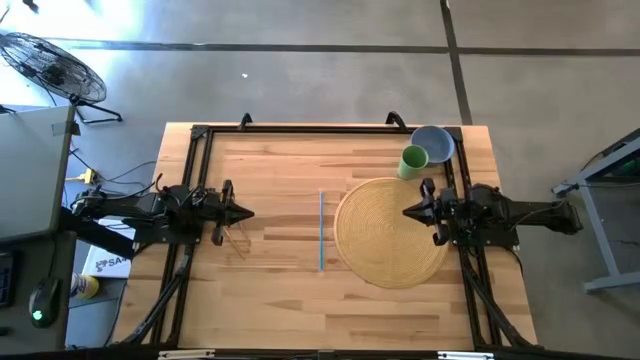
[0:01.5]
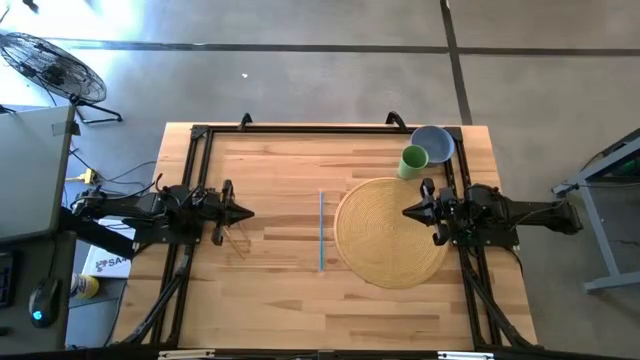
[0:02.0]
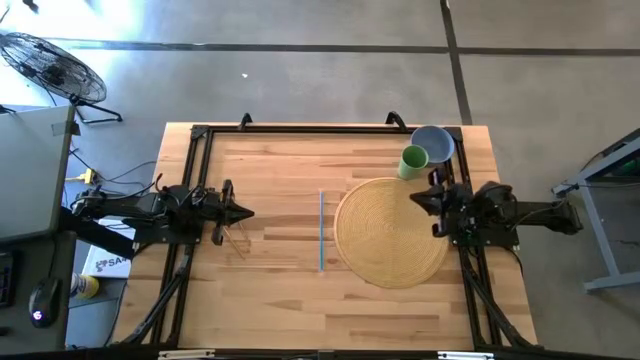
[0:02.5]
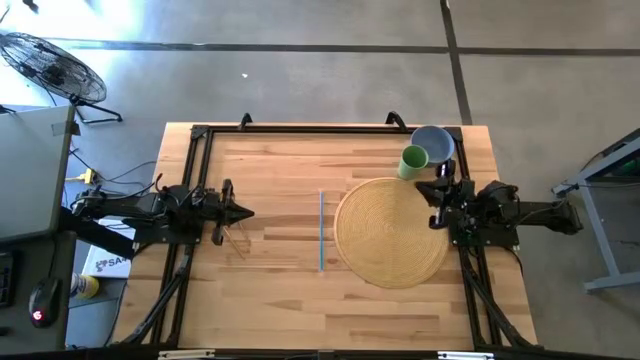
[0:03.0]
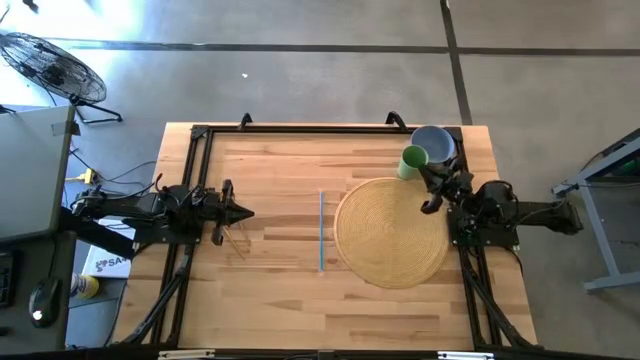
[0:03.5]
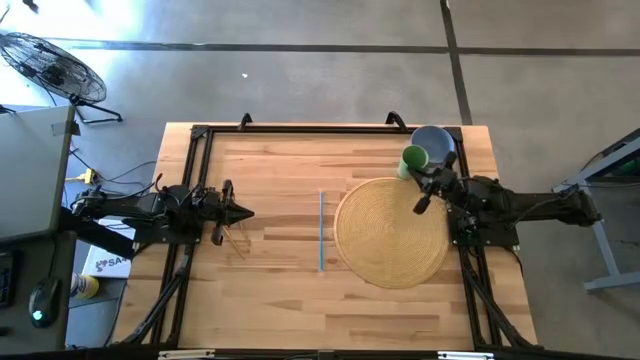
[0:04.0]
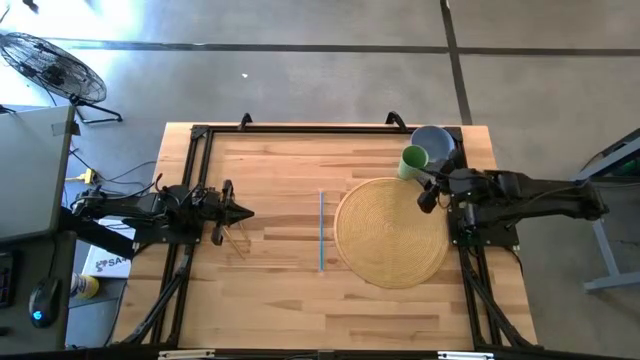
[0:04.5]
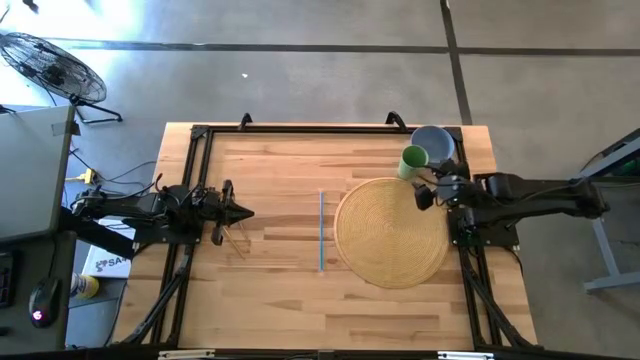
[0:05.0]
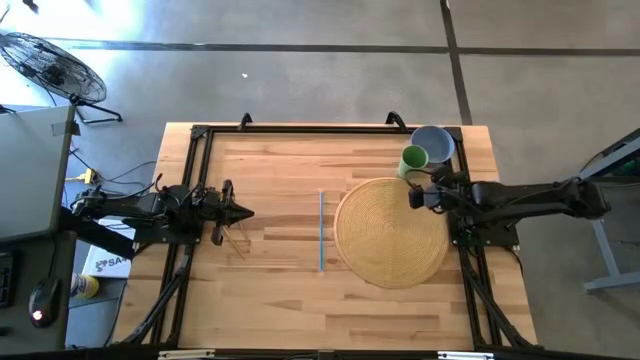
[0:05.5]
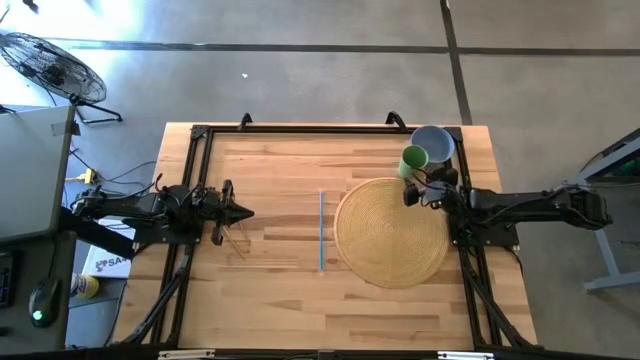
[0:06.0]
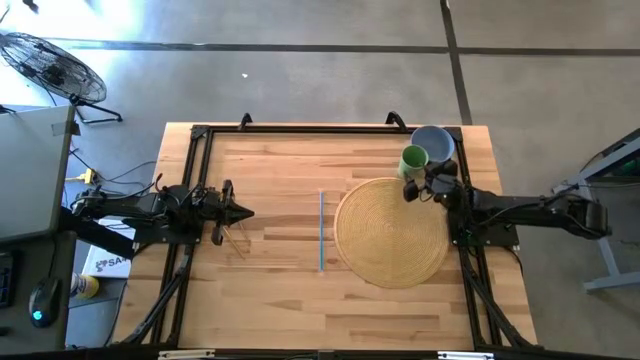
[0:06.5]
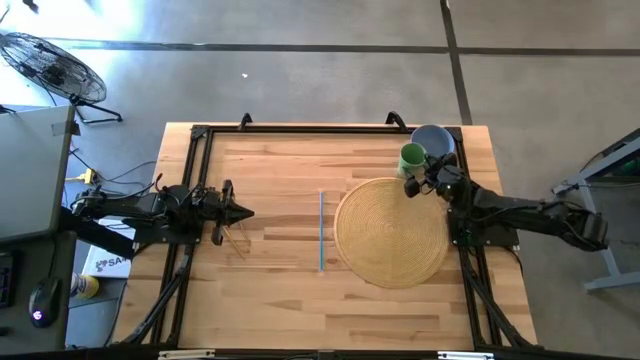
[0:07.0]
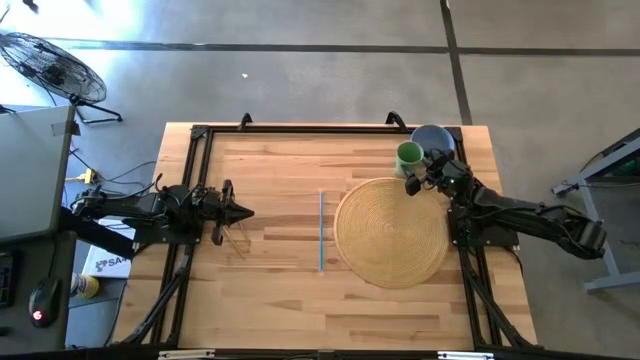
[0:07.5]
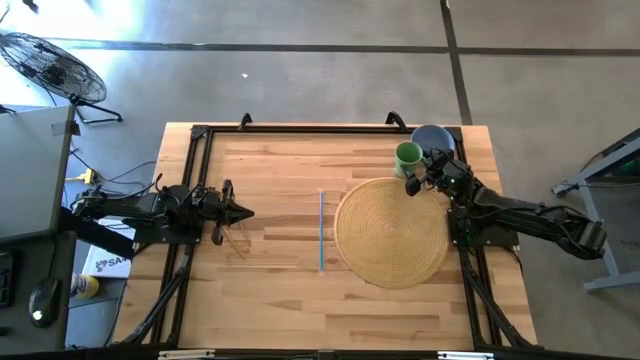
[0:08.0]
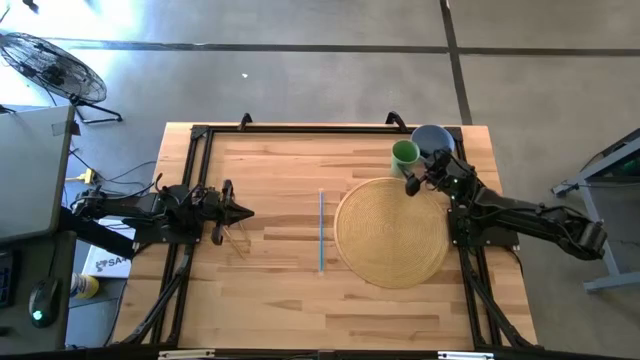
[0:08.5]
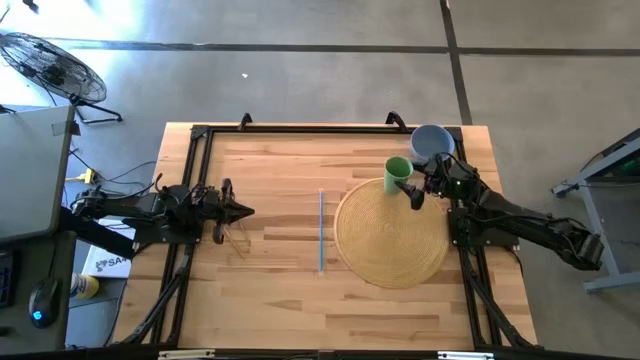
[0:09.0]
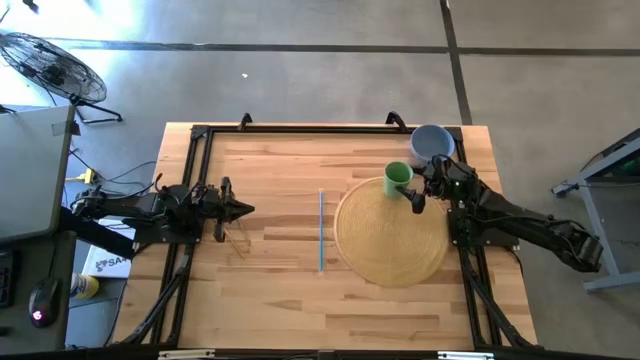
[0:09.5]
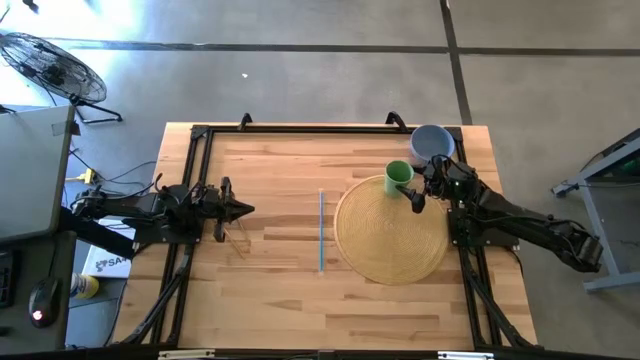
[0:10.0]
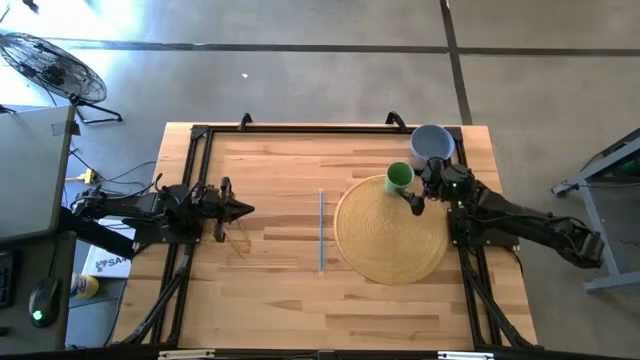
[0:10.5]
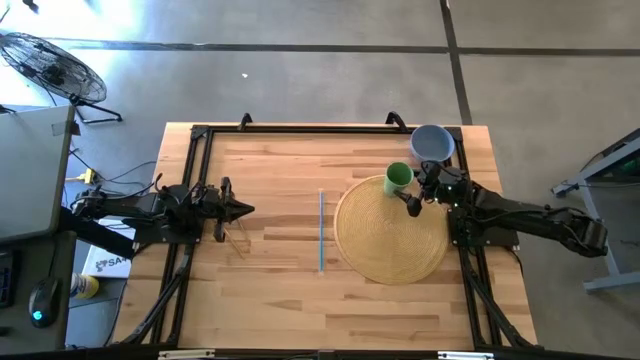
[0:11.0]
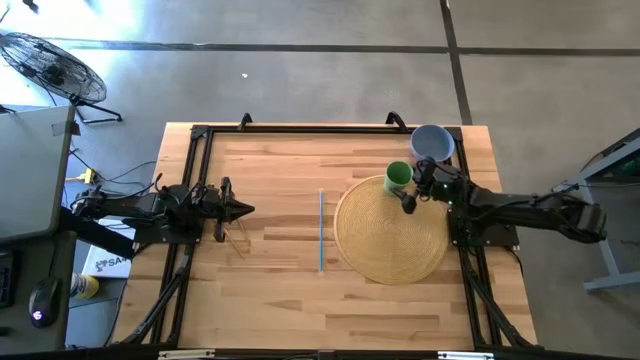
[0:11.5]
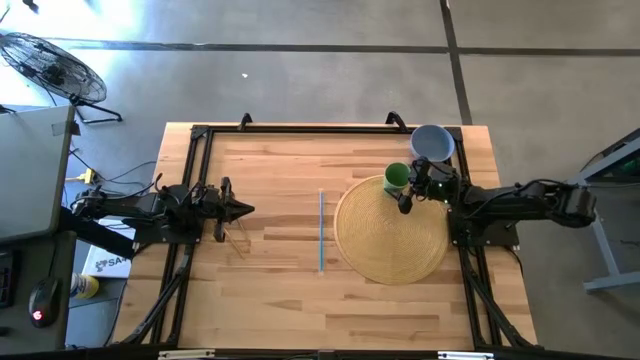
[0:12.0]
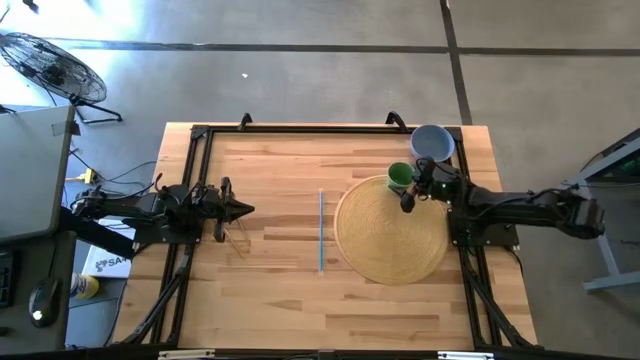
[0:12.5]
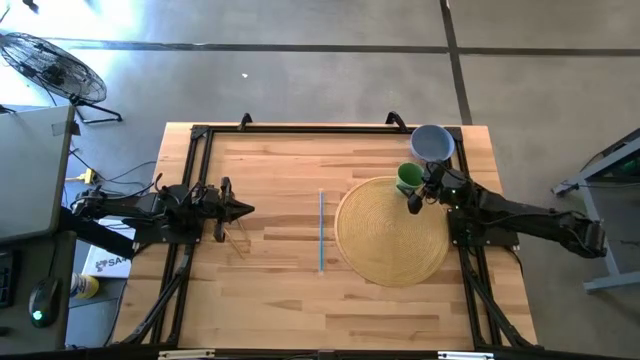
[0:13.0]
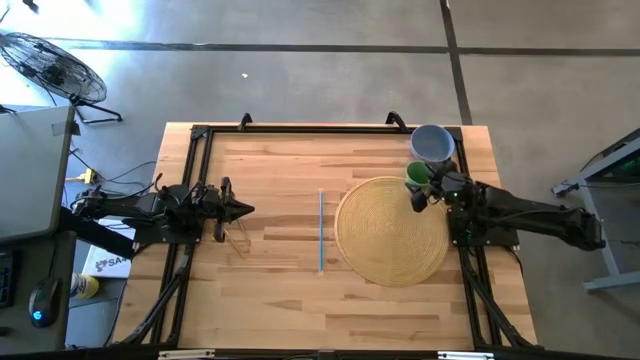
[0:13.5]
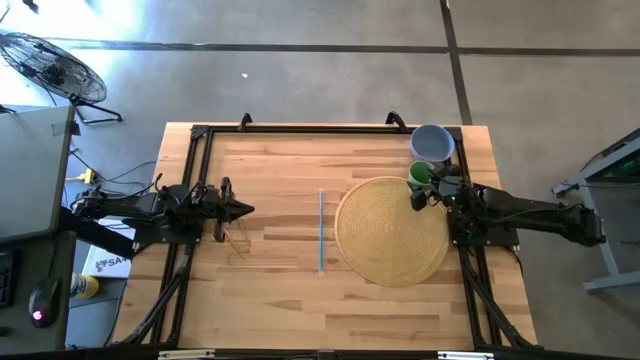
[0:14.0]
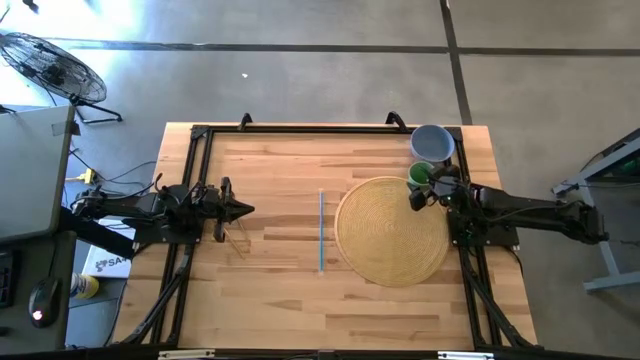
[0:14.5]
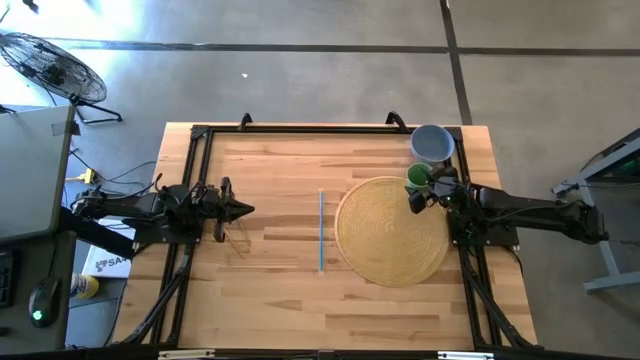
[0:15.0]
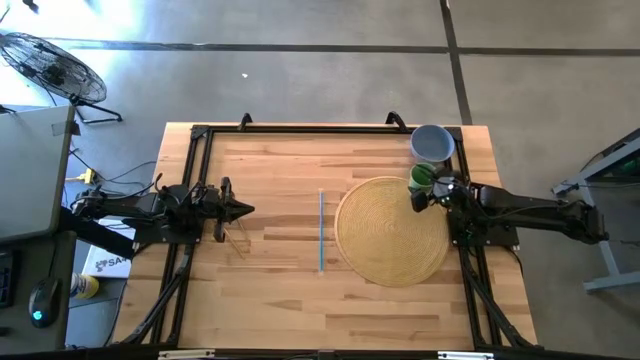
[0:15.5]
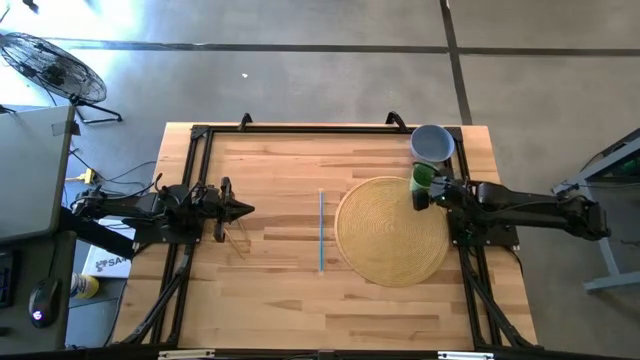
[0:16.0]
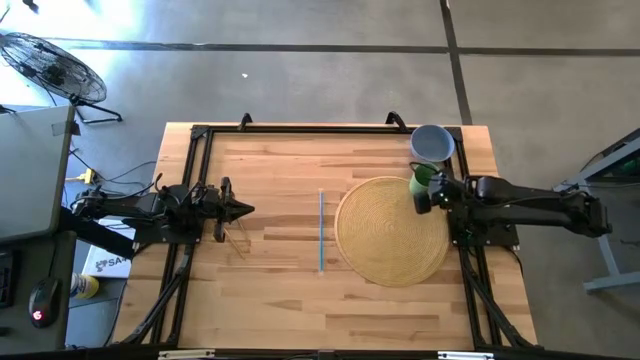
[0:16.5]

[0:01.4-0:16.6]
Task: Pick & Place Utensil
Put the green cup on the brown table mat
